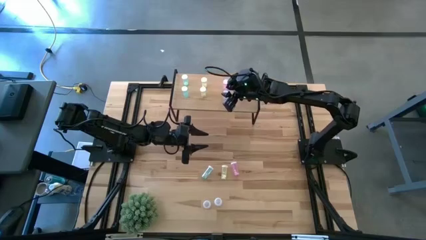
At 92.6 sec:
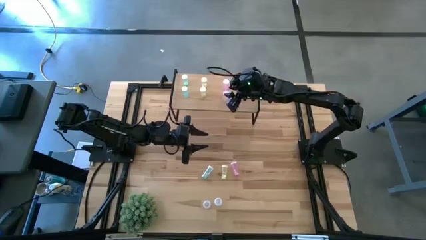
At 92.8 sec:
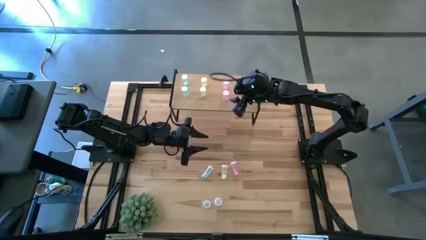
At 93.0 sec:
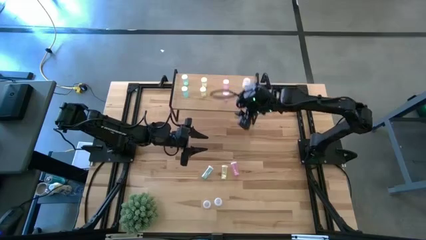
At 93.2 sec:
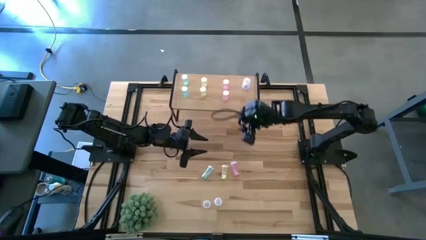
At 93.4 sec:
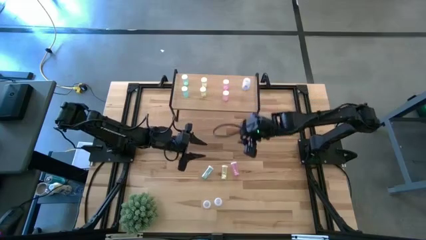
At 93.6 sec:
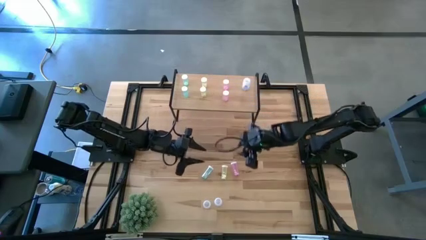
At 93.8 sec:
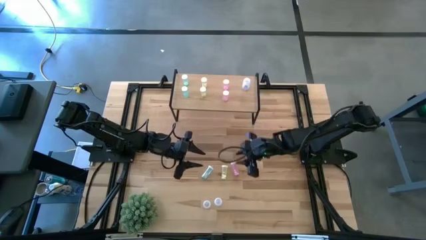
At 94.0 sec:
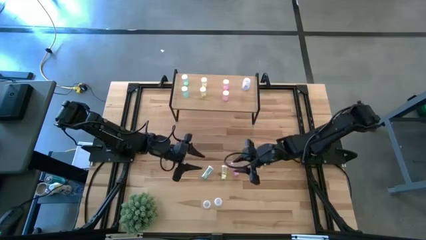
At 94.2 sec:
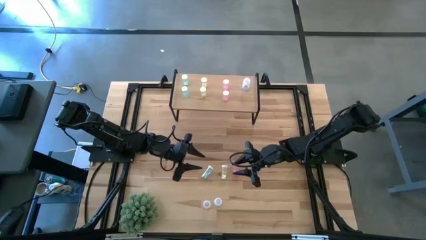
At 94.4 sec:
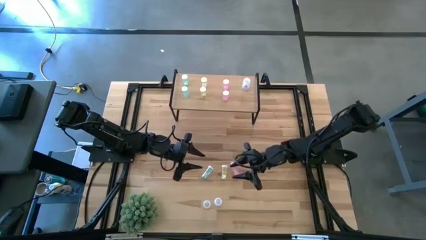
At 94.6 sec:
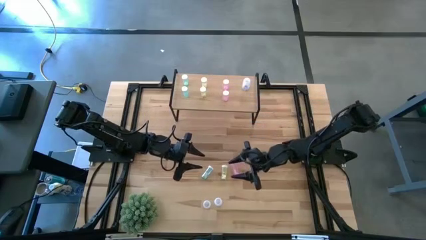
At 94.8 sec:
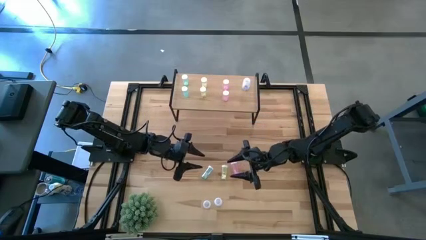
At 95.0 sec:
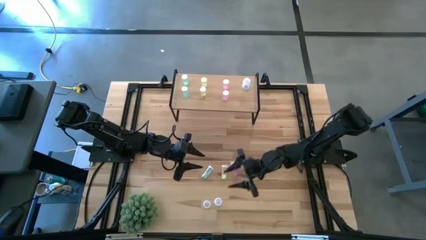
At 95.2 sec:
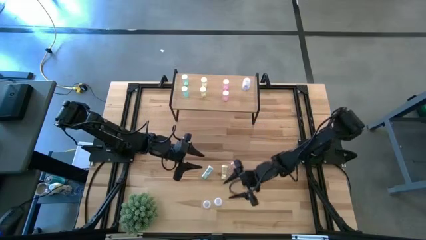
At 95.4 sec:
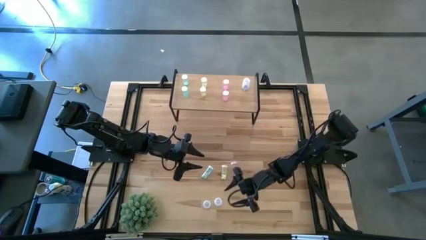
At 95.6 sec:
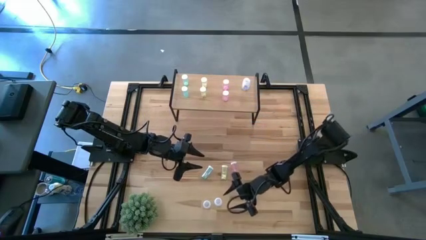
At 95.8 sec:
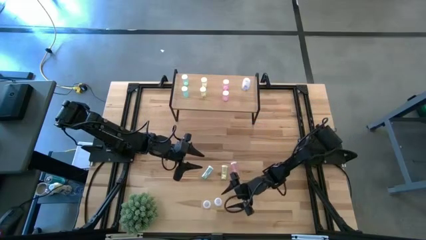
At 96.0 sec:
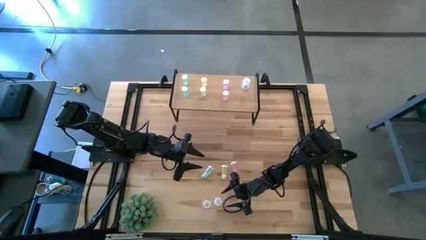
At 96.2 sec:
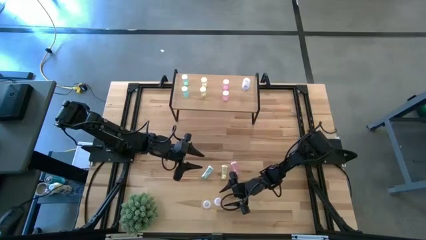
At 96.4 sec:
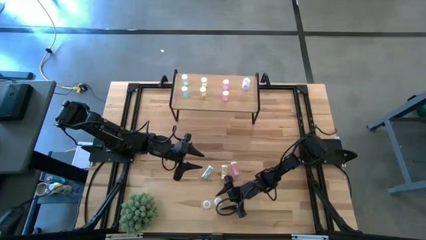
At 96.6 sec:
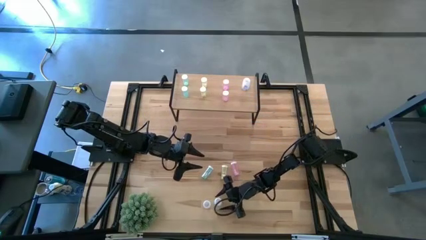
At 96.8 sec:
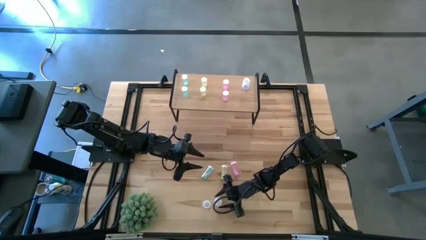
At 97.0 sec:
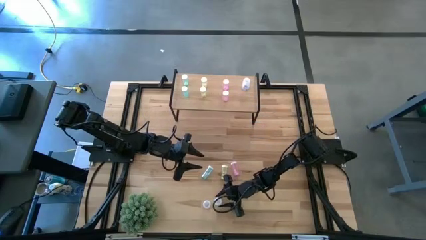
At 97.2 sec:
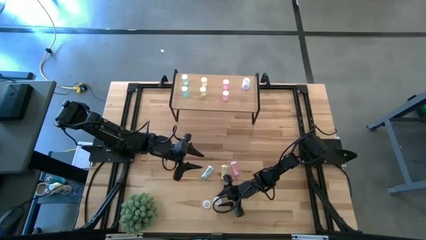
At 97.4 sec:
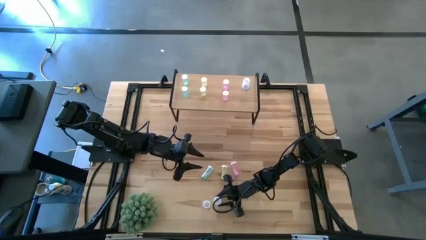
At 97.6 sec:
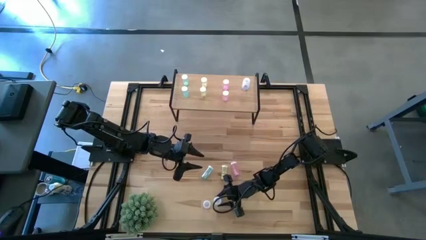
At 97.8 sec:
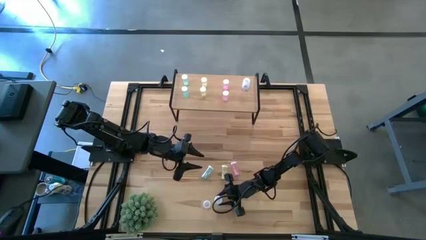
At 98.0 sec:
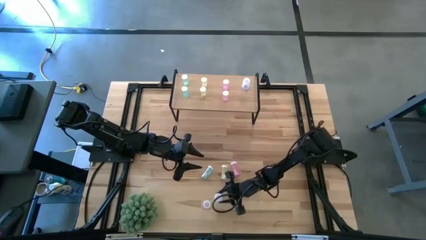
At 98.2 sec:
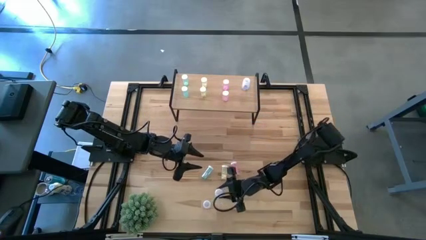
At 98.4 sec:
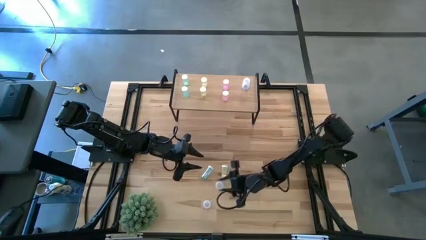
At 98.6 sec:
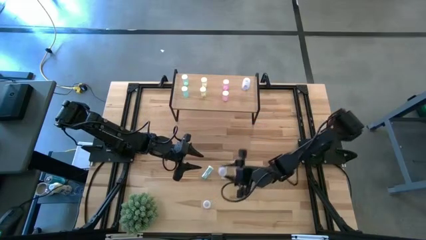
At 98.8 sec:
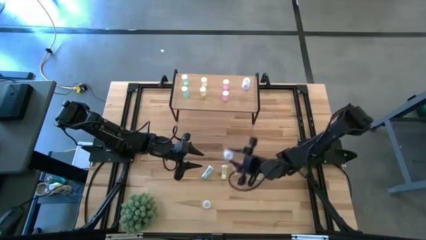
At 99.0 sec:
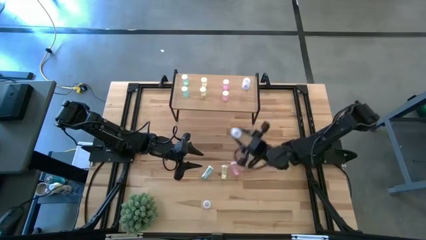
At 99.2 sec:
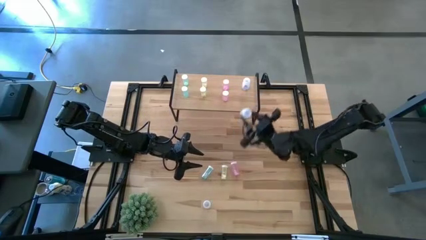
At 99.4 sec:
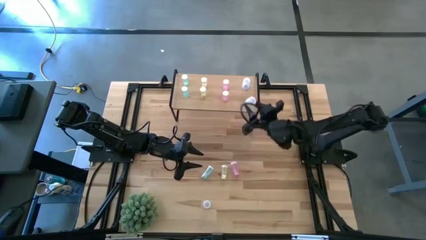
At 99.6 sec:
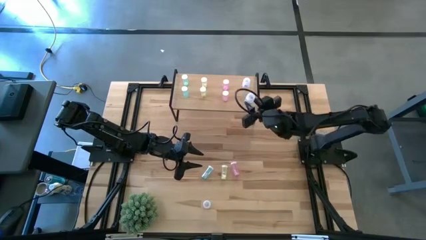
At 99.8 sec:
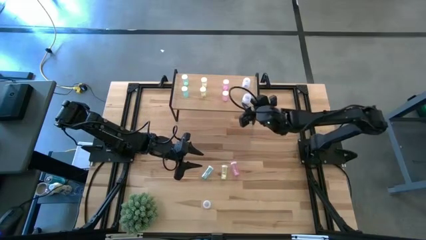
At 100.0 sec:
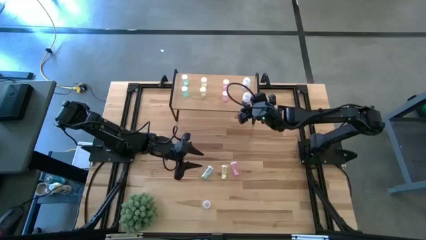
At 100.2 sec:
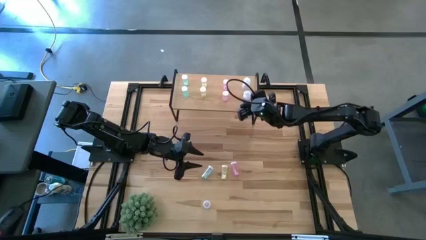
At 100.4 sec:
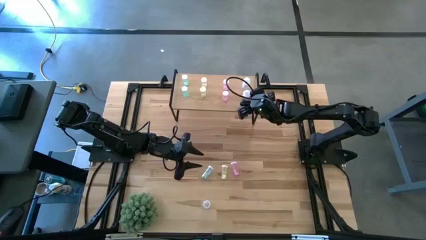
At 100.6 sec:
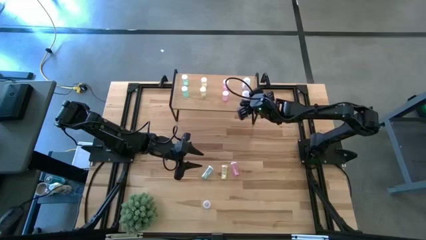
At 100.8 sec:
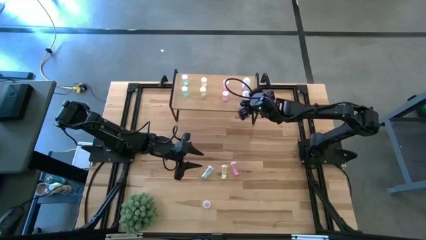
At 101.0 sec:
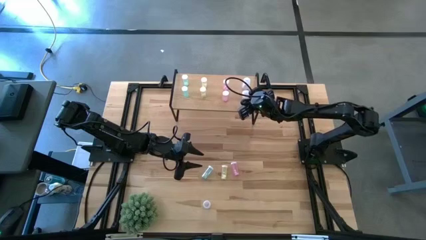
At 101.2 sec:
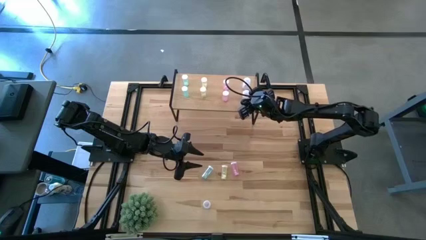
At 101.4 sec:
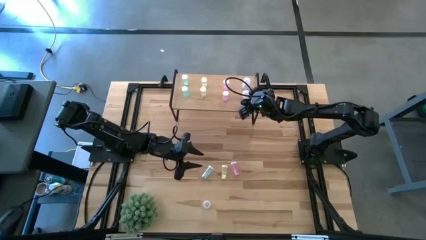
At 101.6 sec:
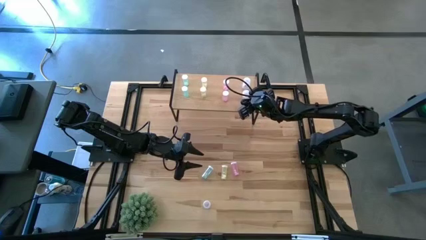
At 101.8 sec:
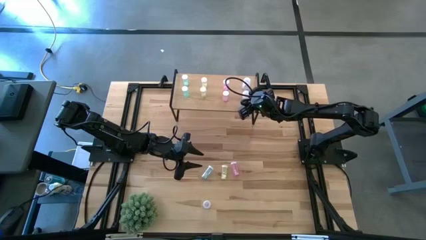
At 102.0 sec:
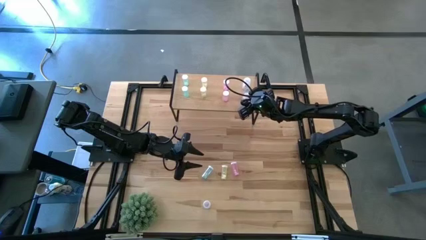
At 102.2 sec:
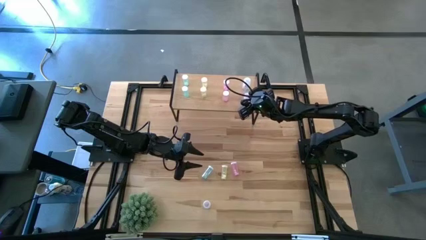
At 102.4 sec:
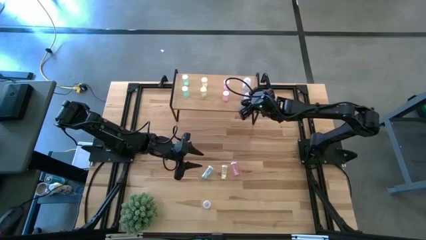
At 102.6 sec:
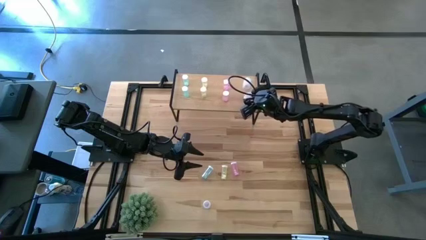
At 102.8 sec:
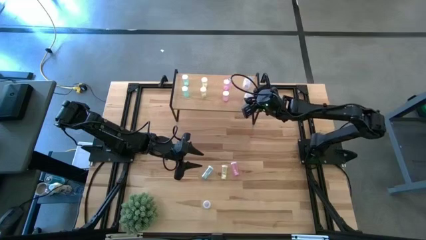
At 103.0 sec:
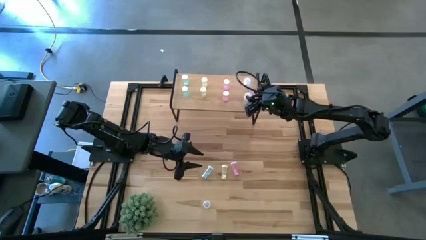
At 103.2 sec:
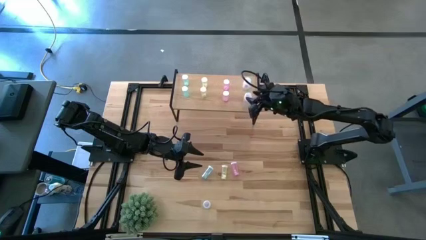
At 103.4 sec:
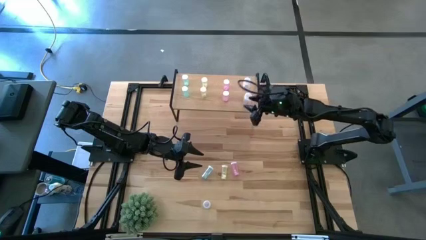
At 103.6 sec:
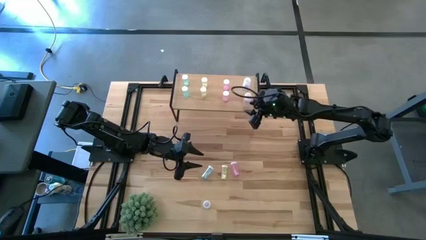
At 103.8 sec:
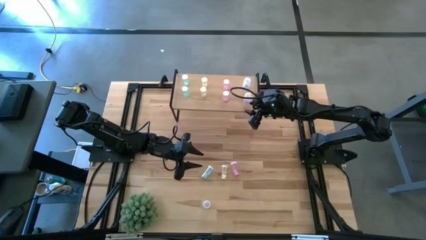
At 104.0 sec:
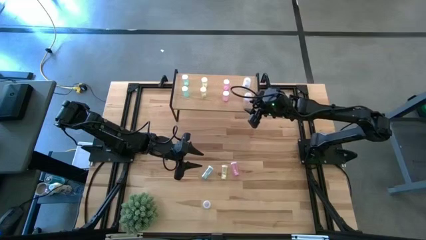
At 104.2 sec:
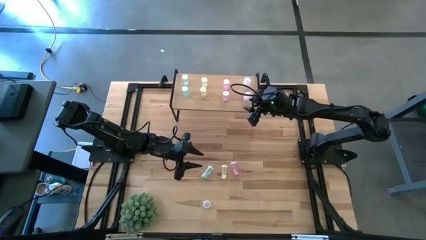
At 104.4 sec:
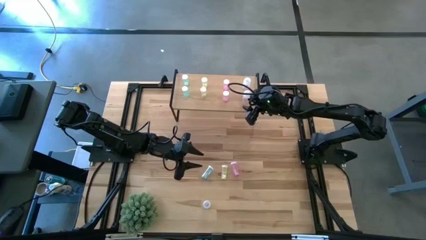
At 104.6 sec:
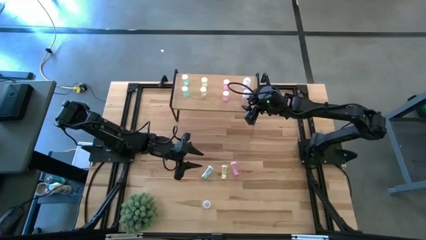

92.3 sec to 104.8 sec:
Task: Pick and place medicine bottles onto shelf by color
Put the right white pill bottle on the shelf aligned with the other white pill bottle

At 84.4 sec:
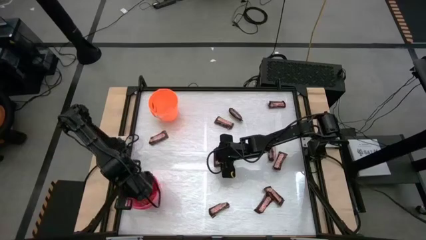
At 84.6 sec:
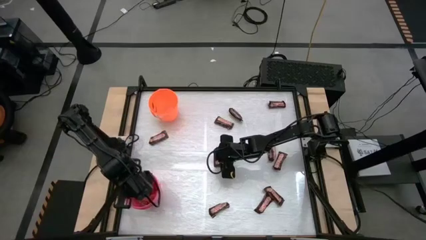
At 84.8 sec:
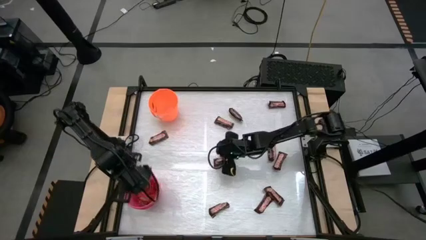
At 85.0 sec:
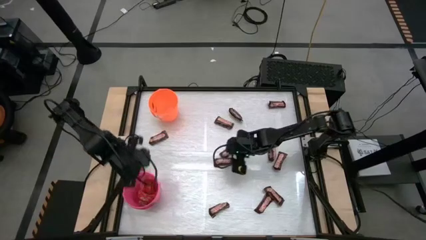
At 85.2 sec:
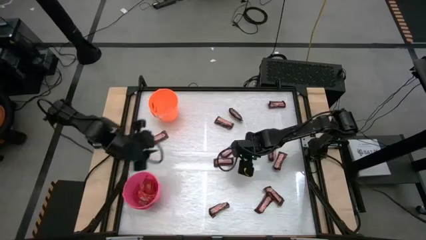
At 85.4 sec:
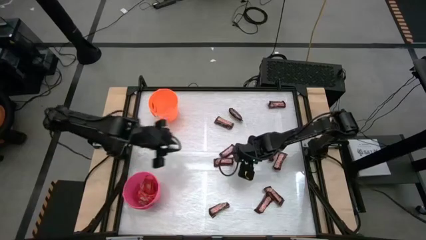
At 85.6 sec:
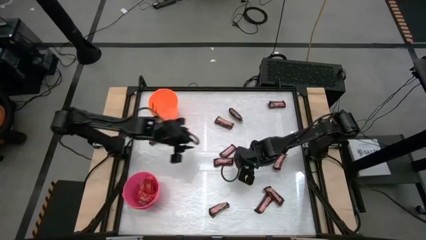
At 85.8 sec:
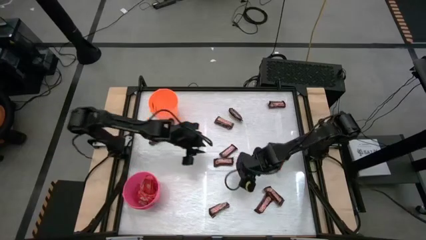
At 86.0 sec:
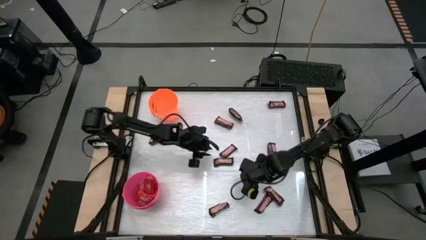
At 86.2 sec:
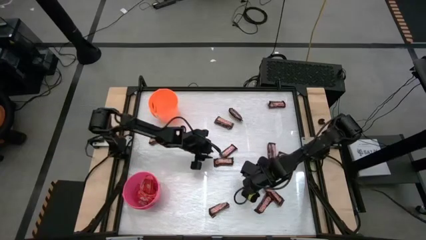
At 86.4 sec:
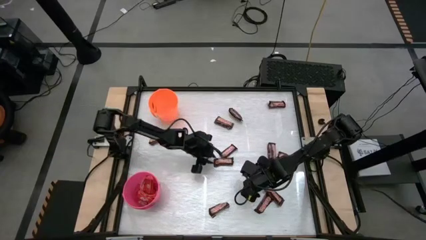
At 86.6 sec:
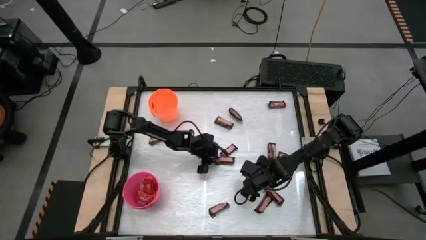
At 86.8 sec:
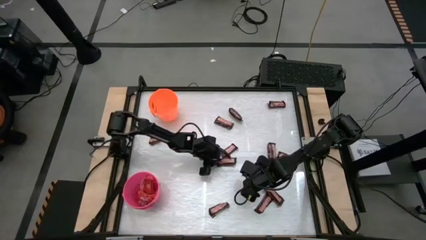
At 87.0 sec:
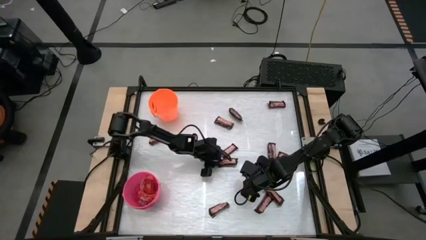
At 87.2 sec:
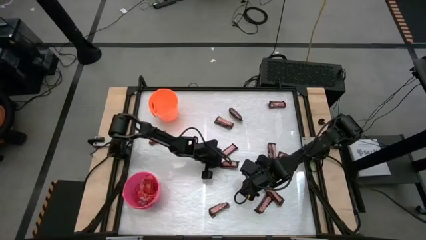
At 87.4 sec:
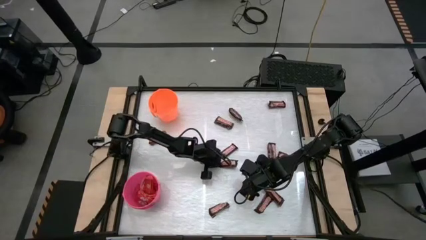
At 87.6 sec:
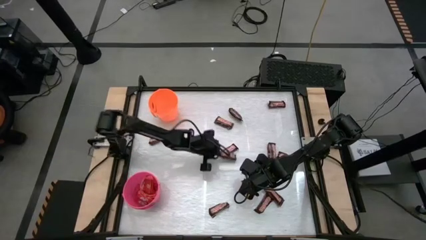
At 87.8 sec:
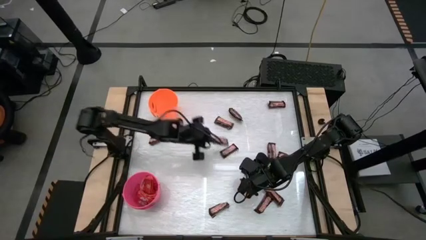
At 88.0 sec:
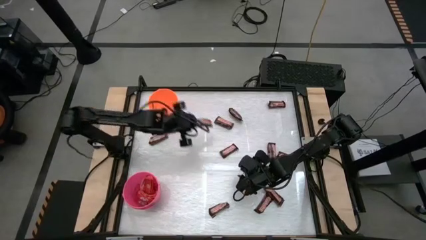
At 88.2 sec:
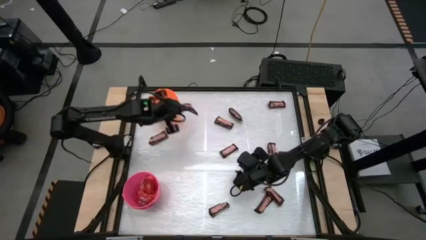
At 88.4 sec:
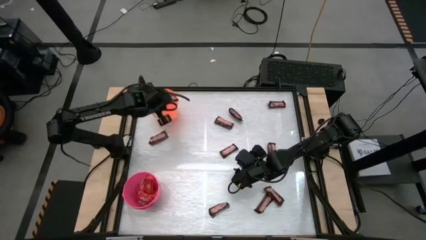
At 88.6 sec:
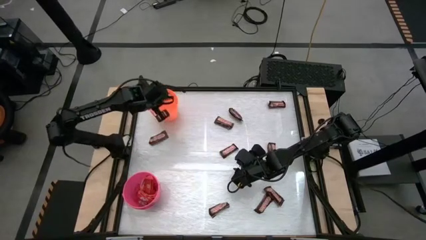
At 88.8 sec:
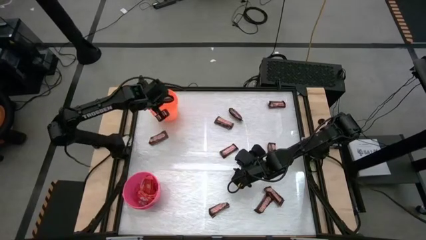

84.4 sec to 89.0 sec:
Task: Sort candy by brand, put in halloween buckets
Put the brown chocolate bar into the orange bucket
